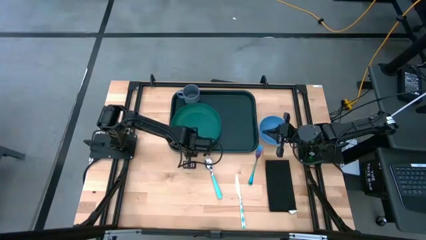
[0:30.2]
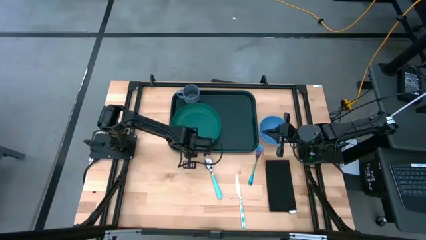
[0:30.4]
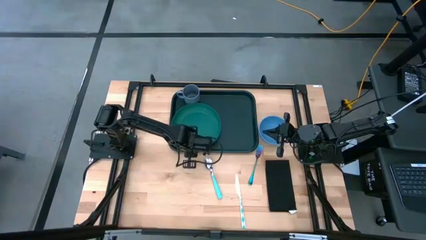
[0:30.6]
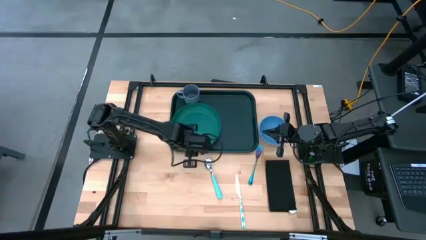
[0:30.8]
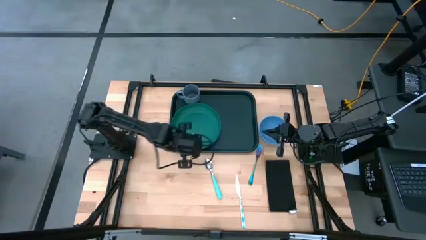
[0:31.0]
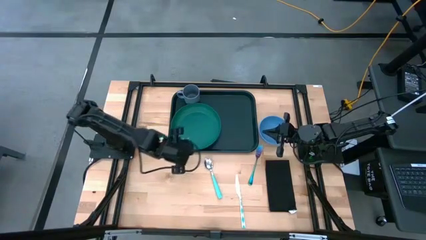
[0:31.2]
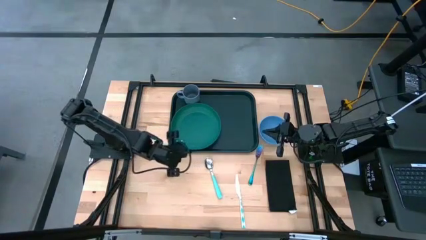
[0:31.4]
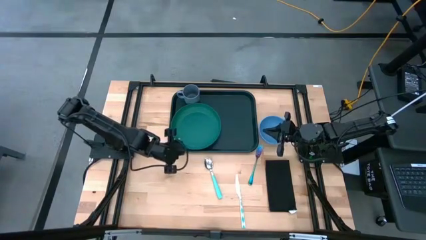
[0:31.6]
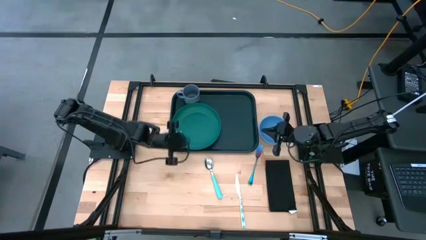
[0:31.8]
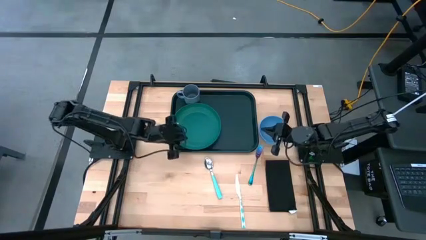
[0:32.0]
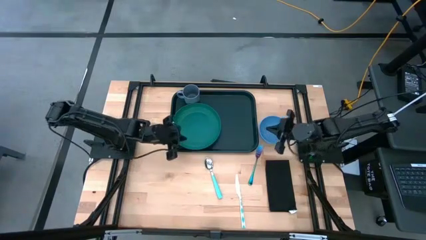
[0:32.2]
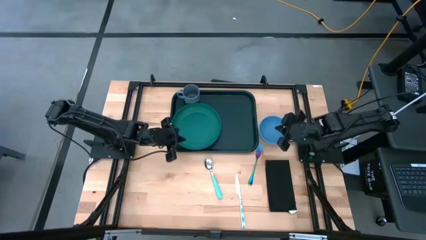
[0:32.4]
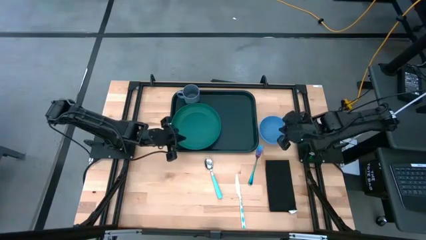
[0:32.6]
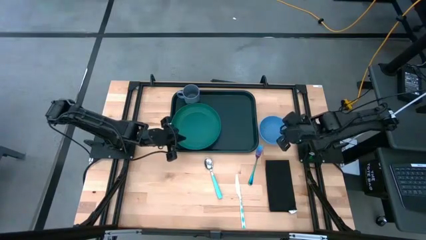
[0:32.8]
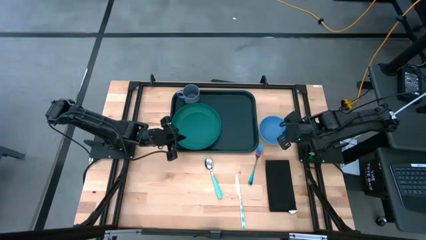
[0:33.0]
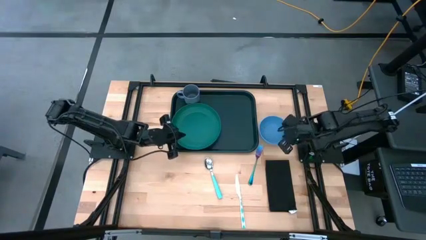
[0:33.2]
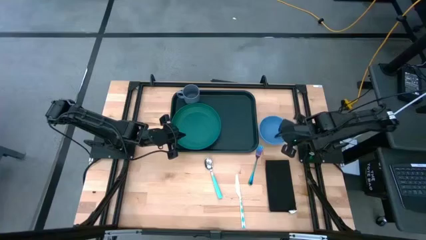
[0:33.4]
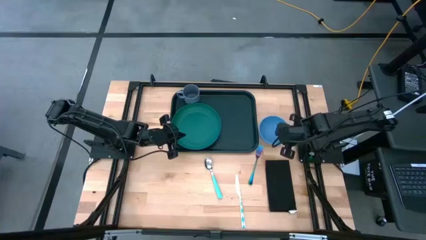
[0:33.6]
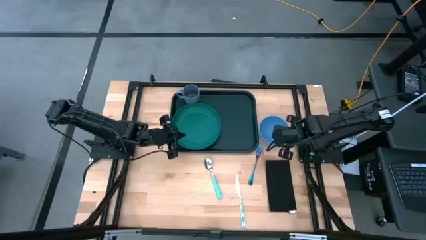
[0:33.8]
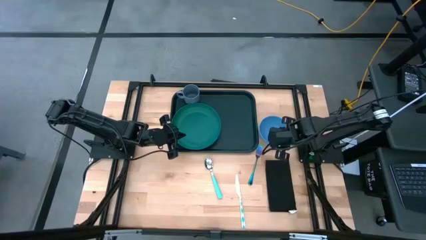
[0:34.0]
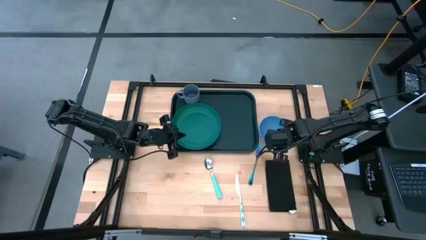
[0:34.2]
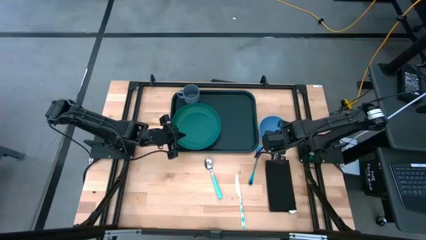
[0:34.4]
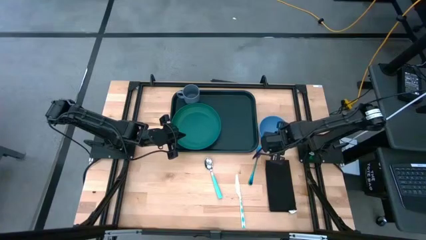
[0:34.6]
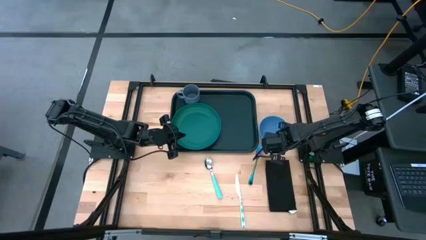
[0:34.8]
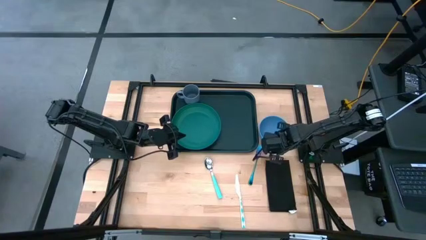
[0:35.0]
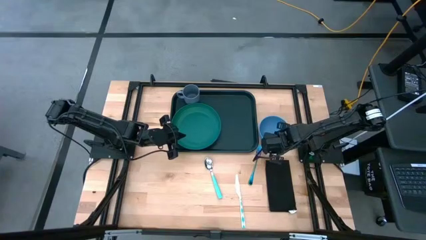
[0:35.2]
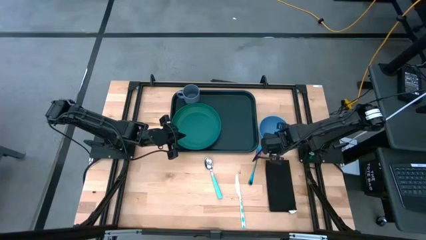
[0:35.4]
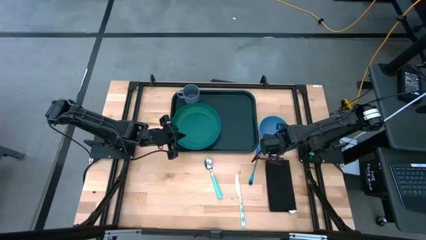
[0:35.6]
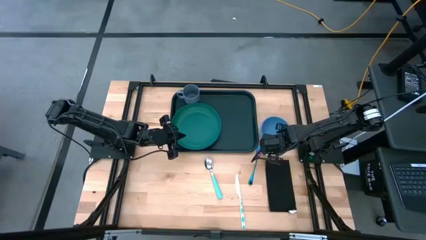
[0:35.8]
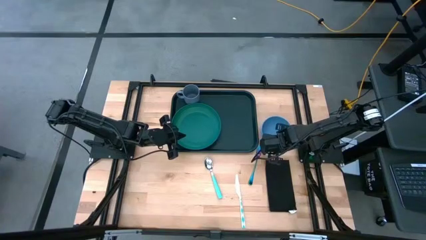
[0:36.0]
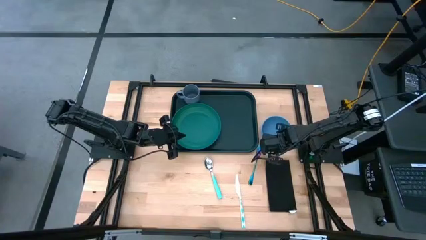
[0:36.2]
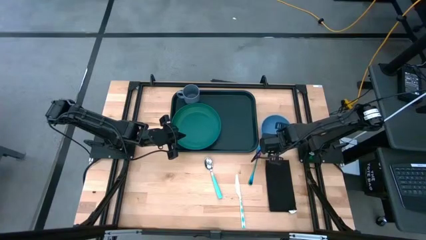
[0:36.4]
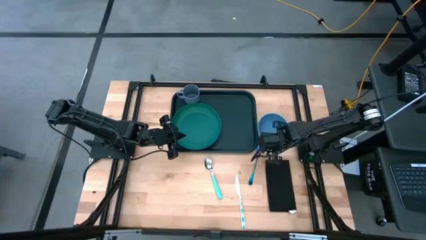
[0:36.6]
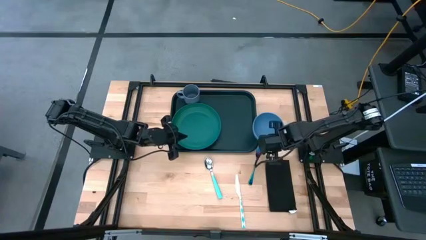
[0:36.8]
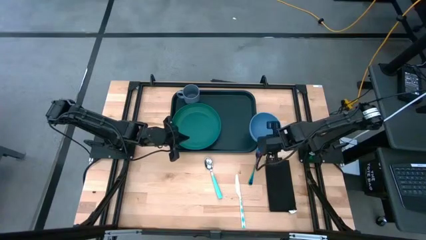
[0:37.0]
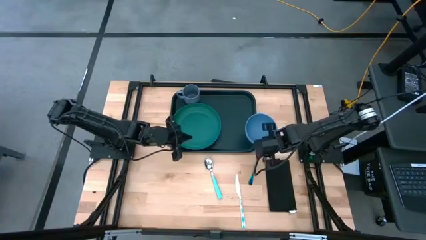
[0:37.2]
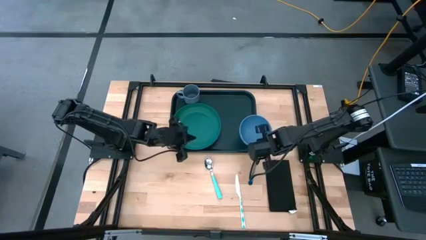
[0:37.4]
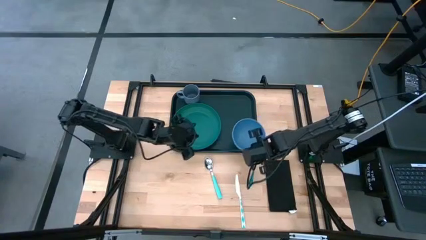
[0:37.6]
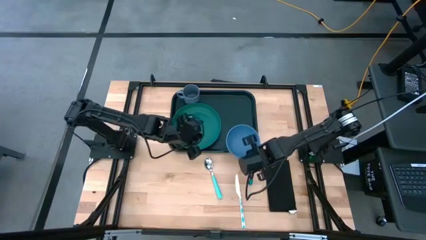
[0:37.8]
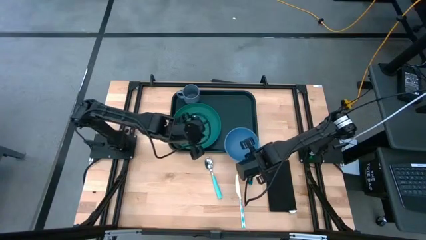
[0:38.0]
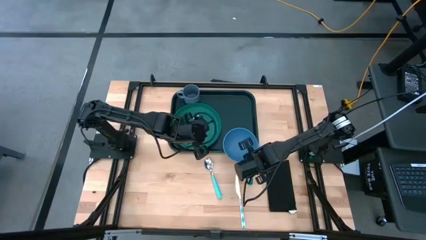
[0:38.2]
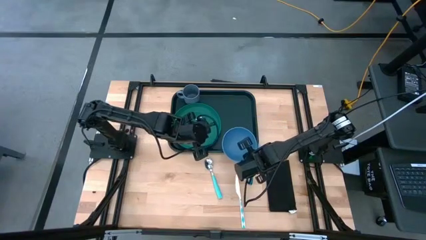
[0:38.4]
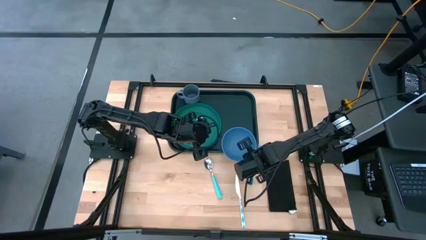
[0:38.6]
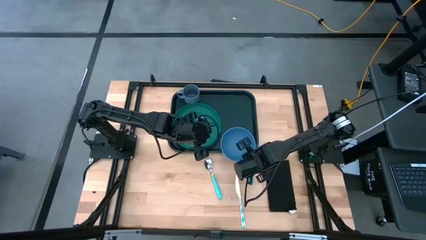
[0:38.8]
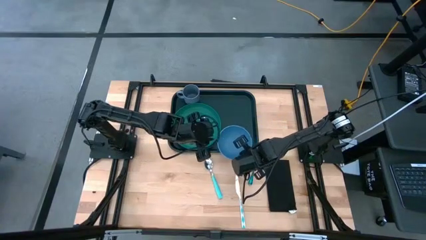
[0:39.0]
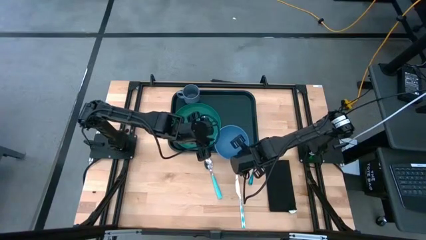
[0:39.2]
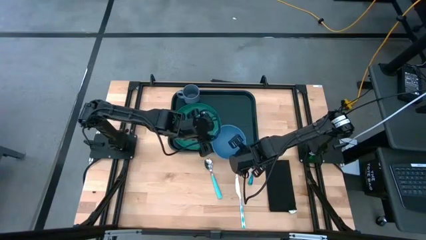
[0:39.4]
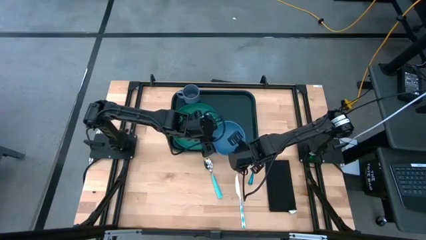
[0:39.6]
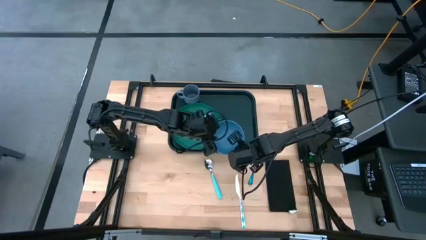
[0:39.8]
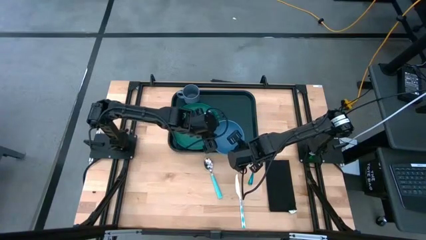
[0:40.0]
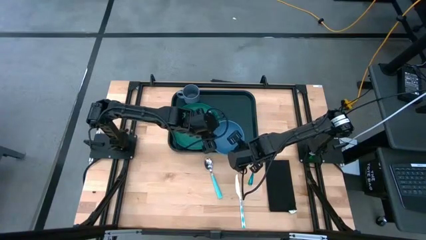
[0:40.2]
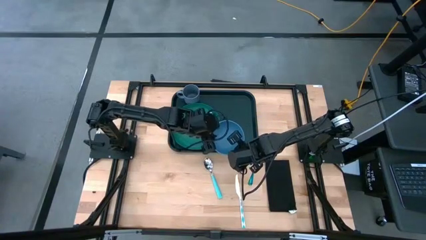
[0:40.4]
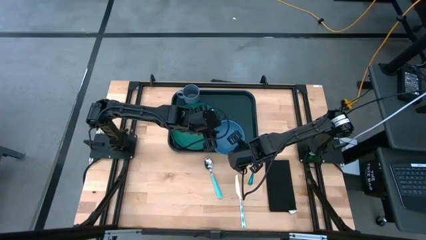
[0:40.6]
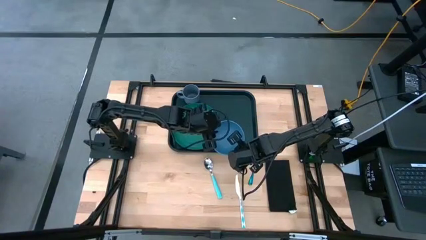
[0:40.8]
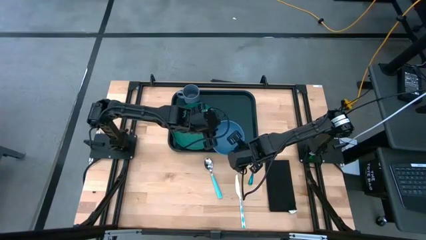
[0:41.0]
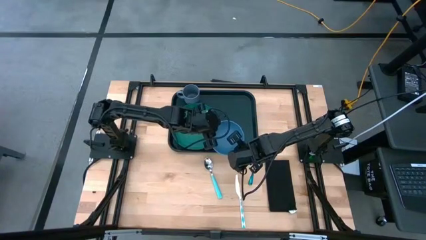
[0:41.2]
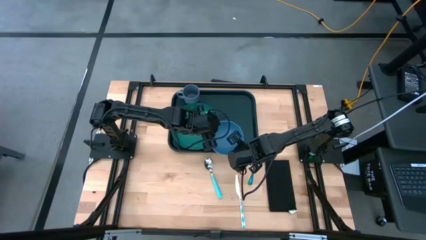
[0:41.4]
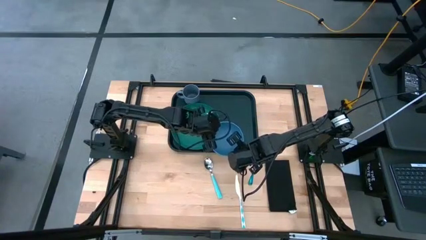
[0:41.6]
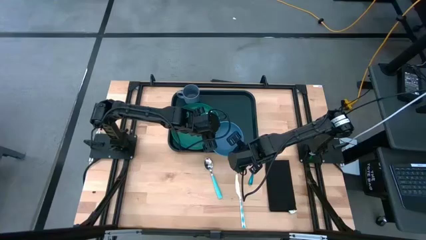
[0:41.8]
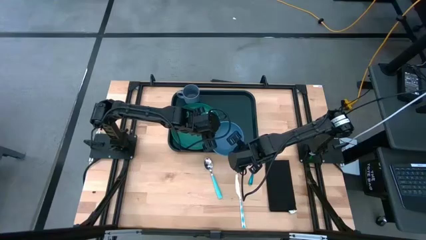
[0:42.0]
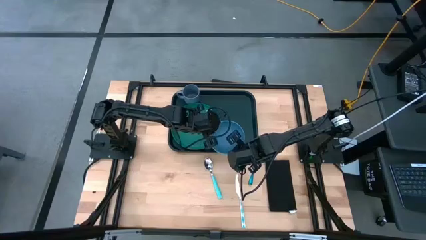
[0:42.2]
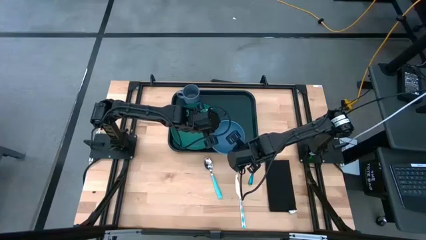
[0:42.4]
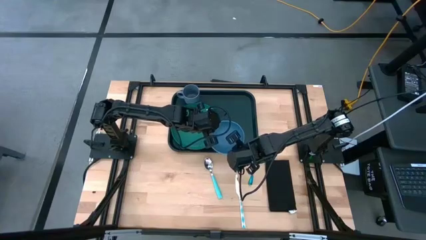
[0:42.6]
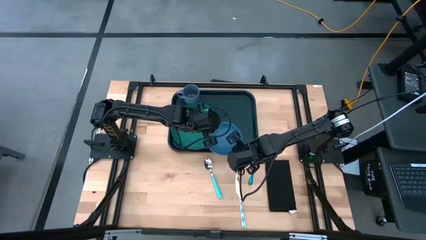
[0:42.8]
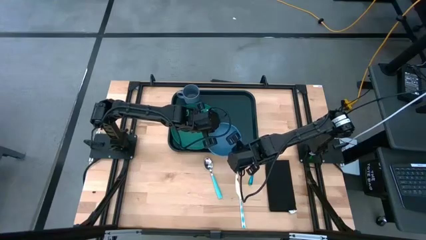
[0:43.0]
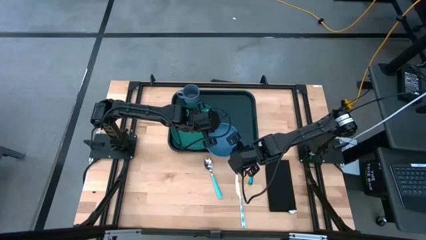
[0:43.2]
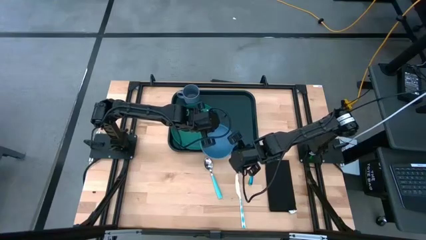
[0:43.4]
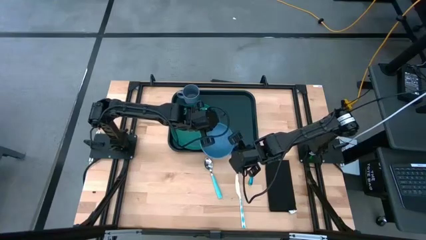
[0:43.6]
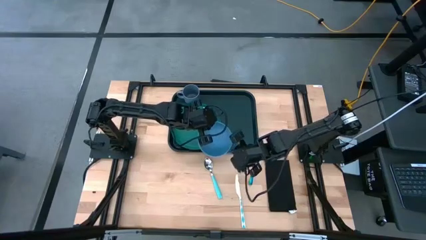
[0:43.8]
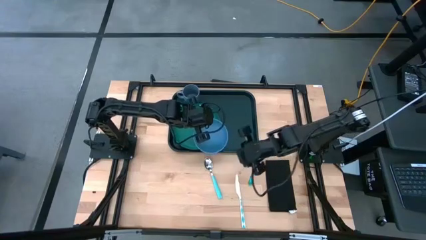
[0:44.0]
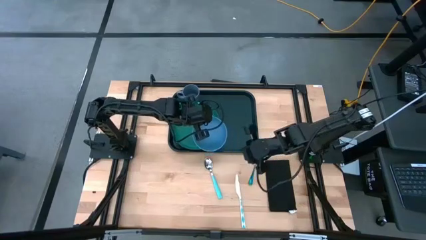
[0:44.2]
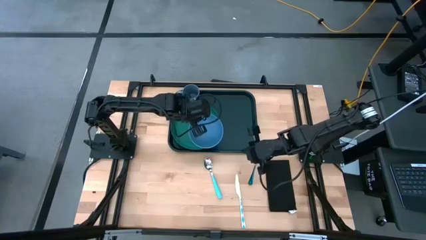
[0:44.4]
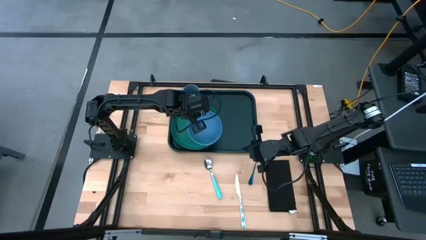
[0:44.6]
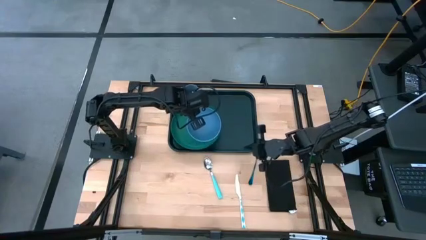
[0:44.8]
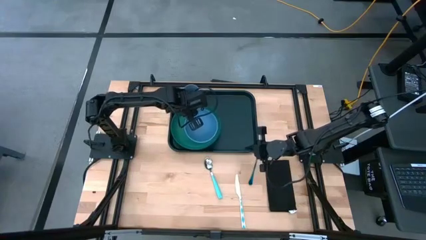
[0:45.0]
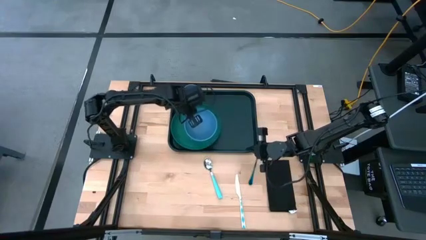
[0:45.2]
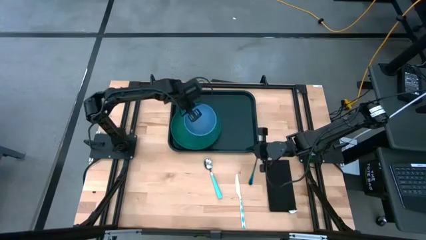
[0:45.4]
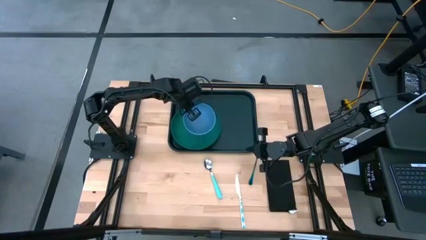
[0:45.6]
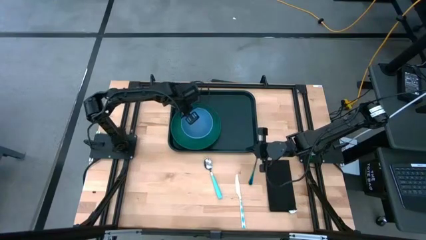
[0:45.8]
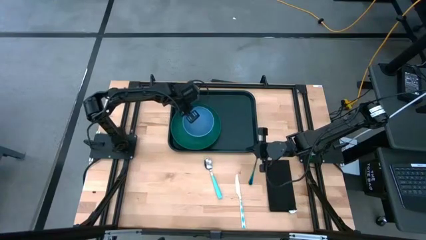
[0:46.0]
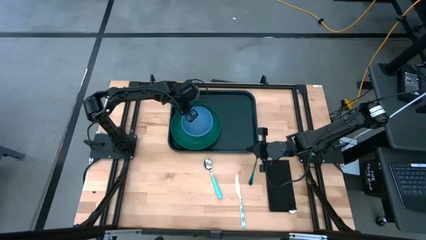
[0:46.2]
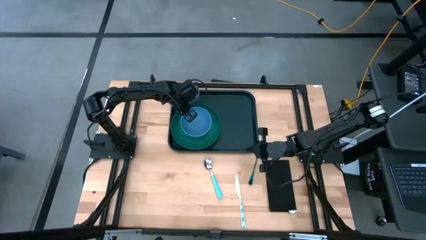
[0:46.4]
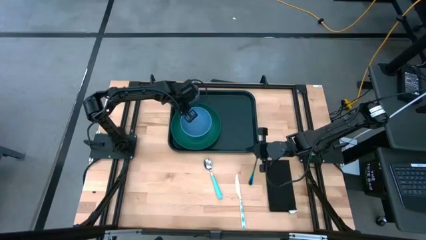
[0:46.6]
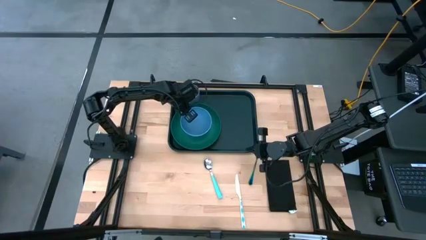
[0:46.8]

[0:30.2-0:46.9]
Task: Set up tray
Put the blue bowl on the green plate on the black serving tray
